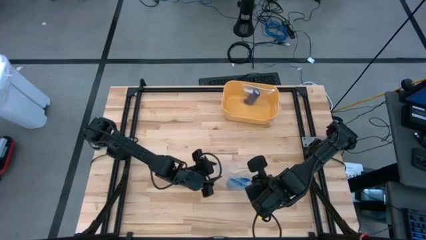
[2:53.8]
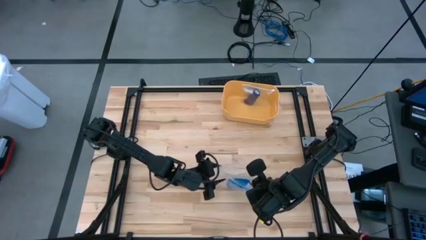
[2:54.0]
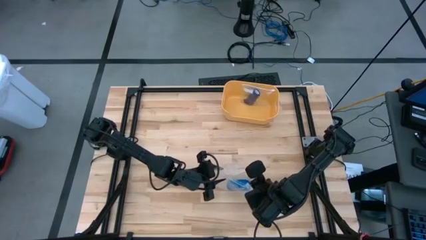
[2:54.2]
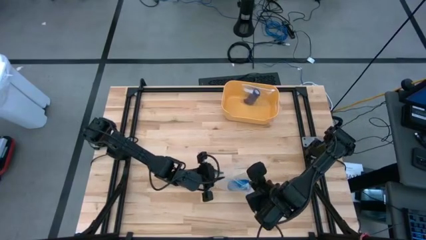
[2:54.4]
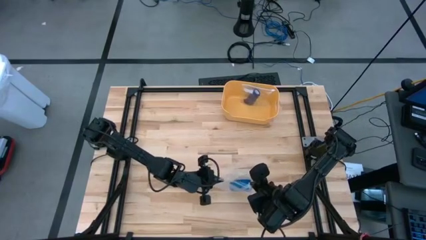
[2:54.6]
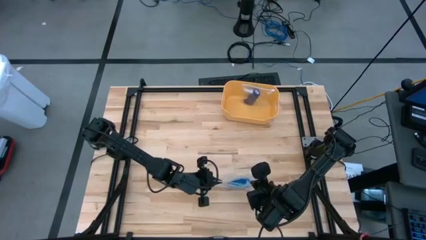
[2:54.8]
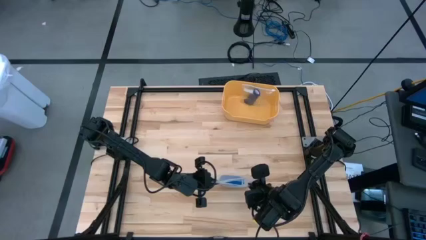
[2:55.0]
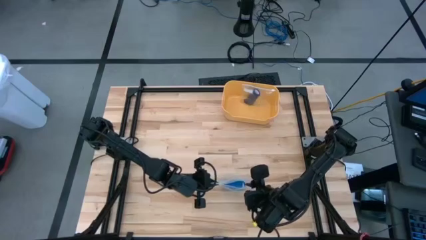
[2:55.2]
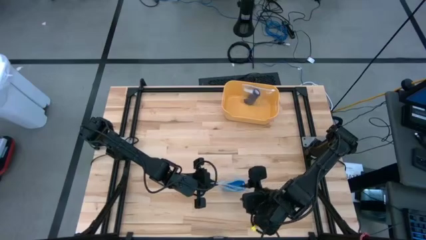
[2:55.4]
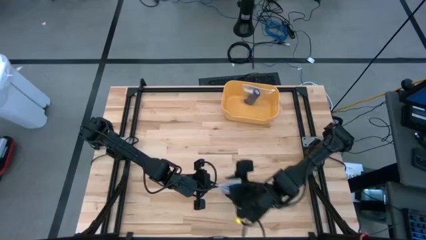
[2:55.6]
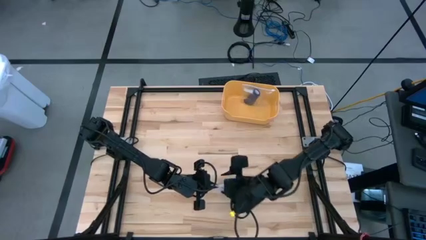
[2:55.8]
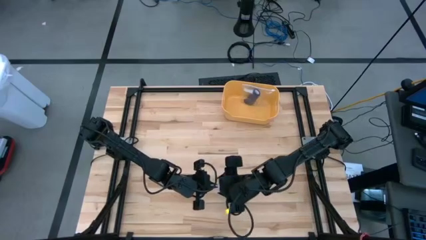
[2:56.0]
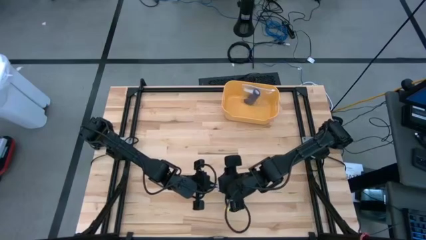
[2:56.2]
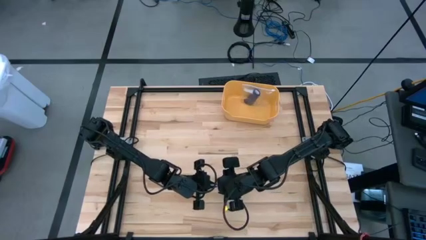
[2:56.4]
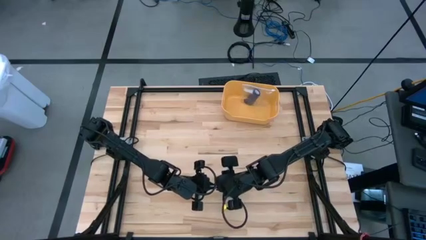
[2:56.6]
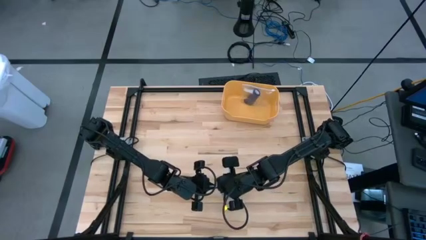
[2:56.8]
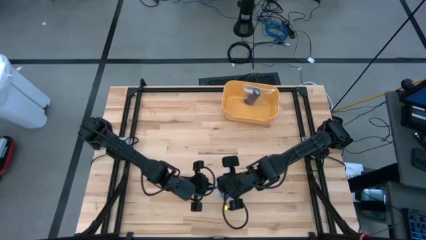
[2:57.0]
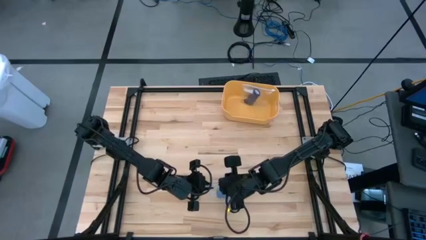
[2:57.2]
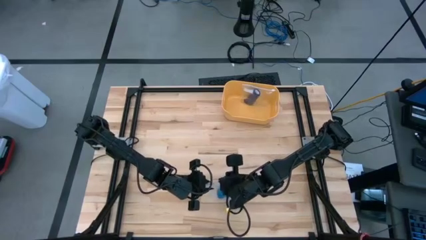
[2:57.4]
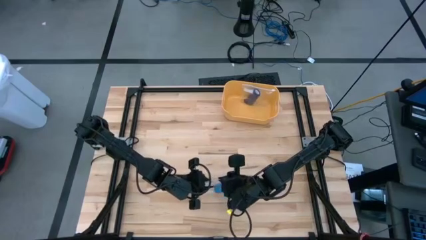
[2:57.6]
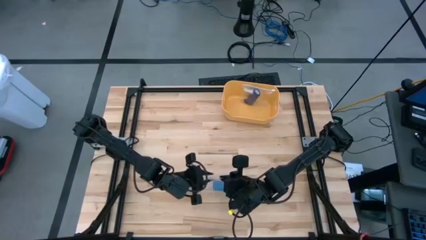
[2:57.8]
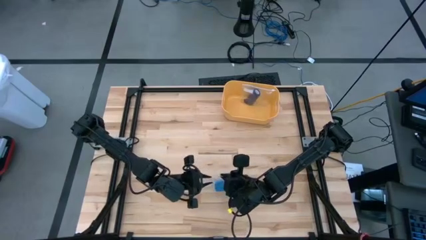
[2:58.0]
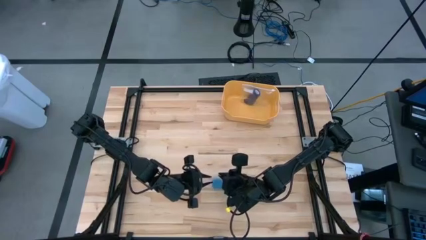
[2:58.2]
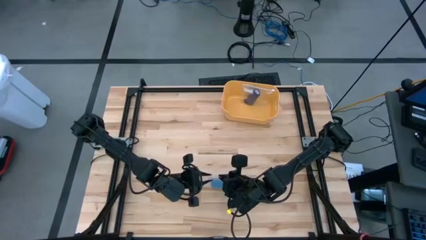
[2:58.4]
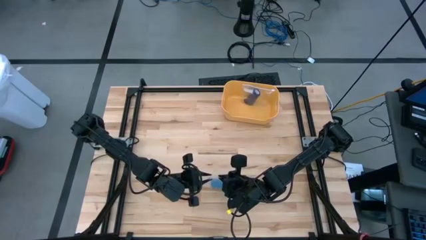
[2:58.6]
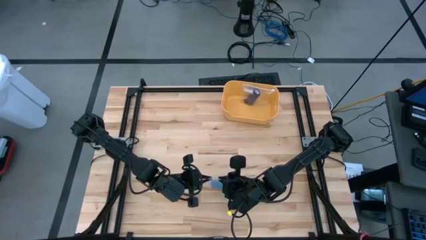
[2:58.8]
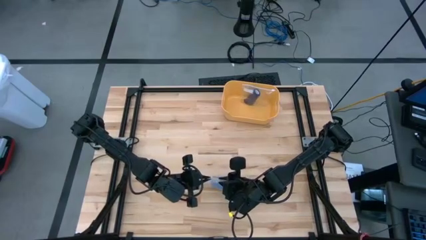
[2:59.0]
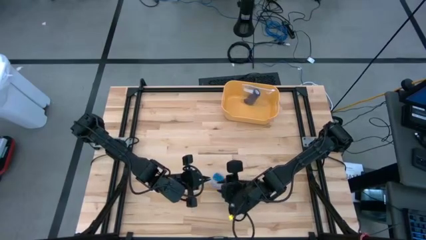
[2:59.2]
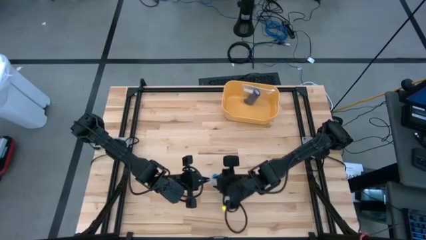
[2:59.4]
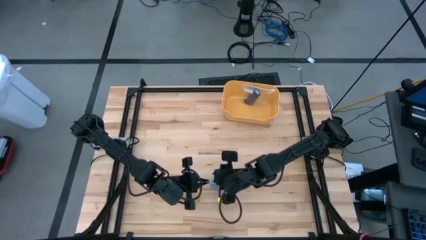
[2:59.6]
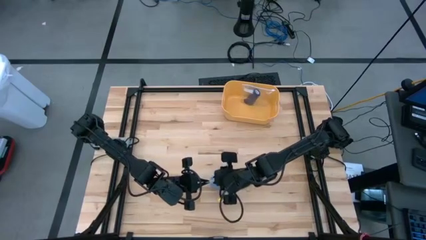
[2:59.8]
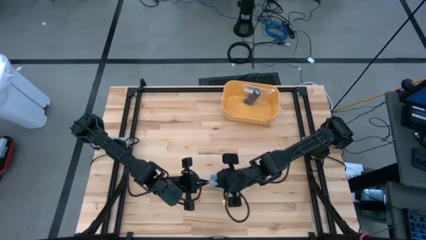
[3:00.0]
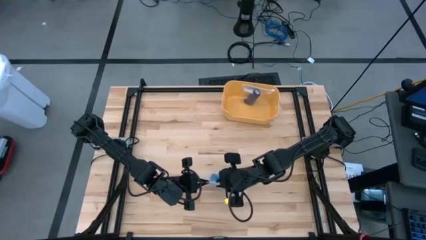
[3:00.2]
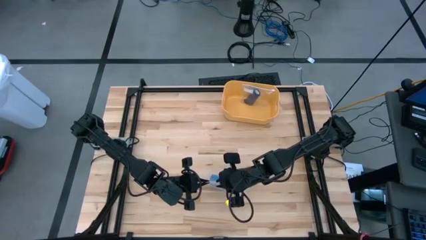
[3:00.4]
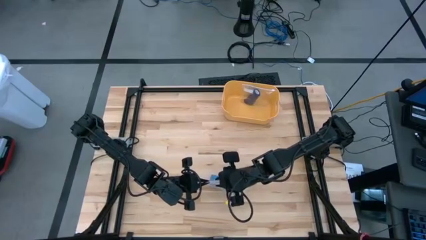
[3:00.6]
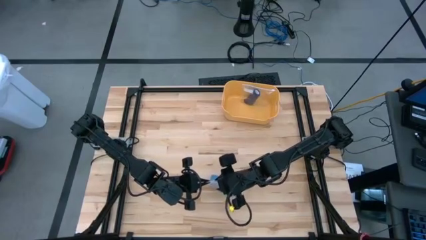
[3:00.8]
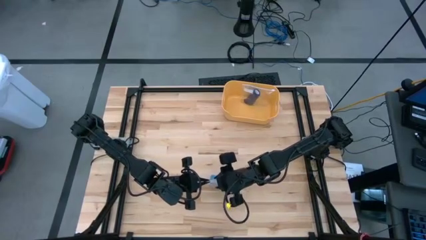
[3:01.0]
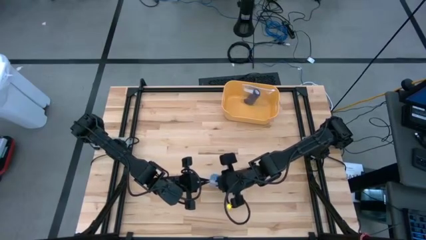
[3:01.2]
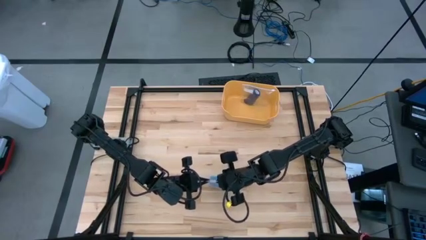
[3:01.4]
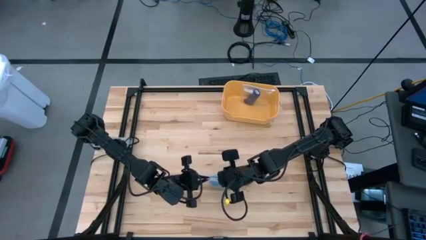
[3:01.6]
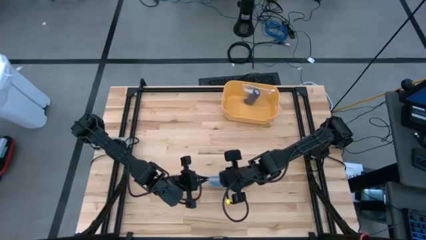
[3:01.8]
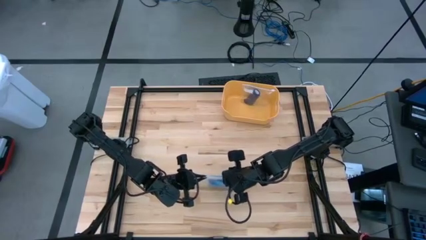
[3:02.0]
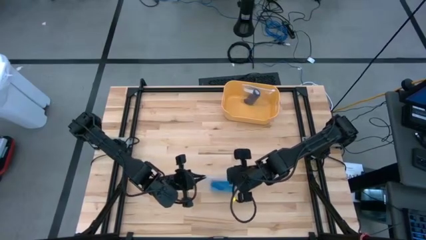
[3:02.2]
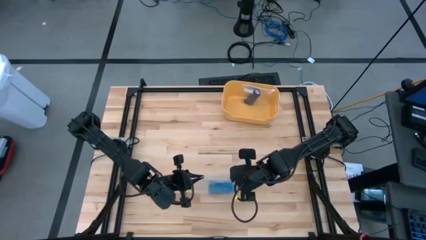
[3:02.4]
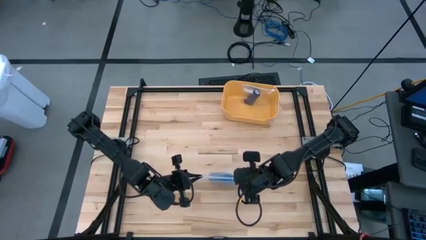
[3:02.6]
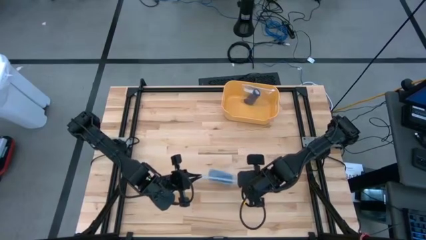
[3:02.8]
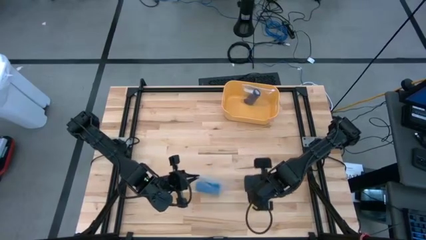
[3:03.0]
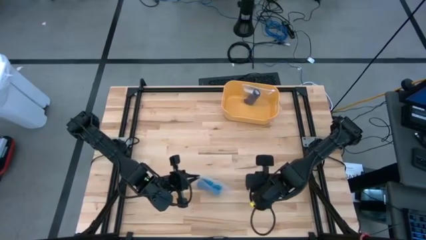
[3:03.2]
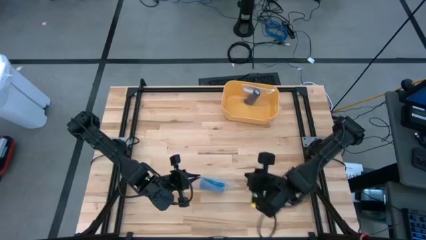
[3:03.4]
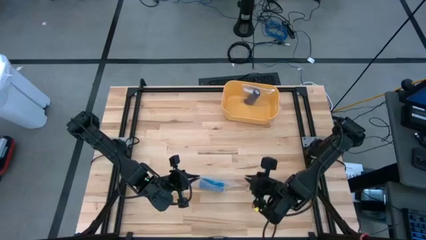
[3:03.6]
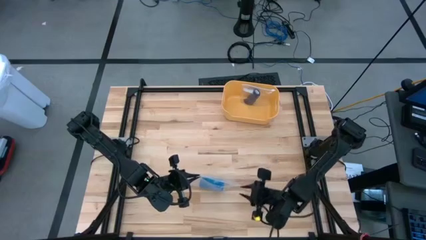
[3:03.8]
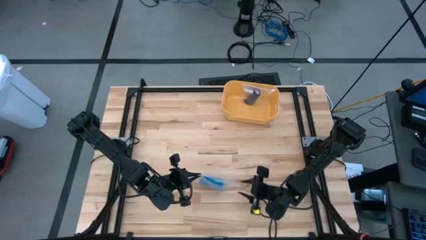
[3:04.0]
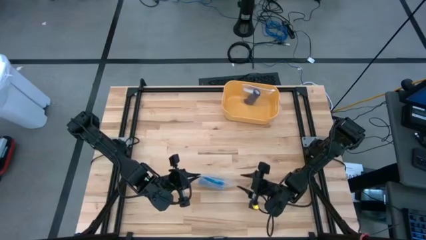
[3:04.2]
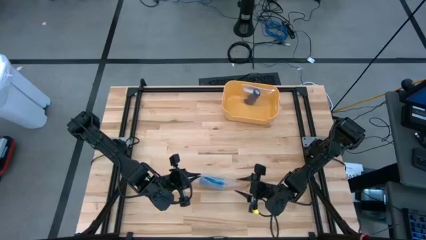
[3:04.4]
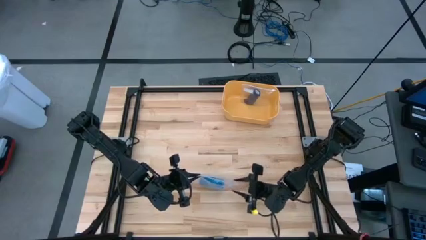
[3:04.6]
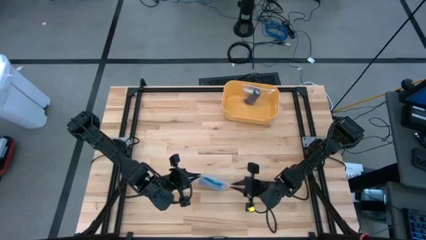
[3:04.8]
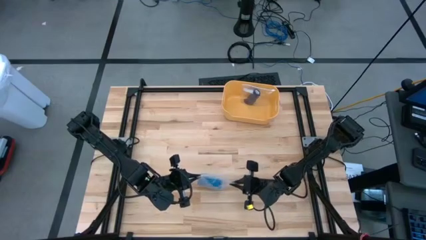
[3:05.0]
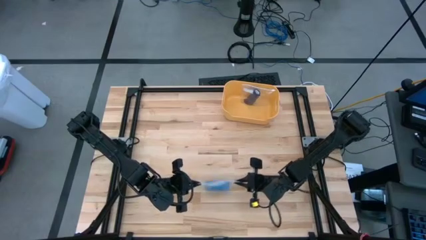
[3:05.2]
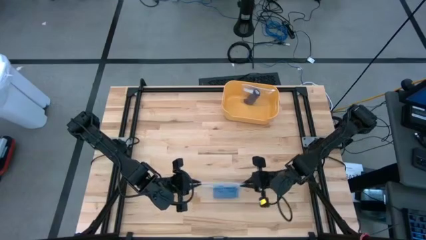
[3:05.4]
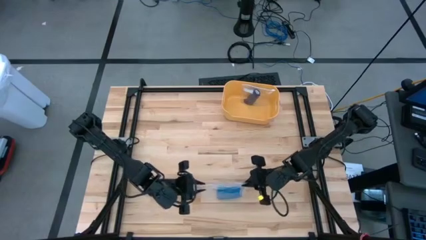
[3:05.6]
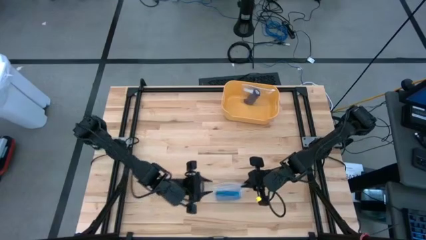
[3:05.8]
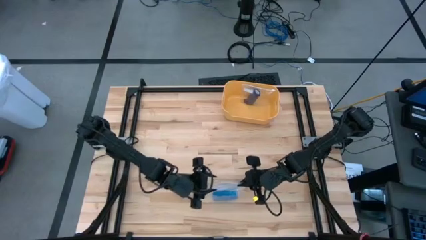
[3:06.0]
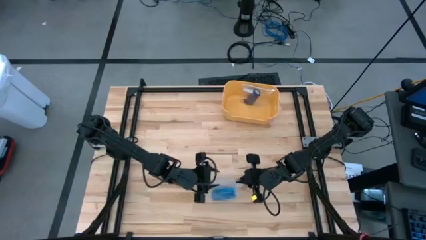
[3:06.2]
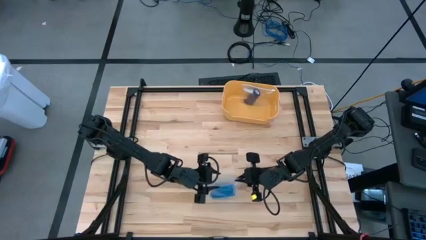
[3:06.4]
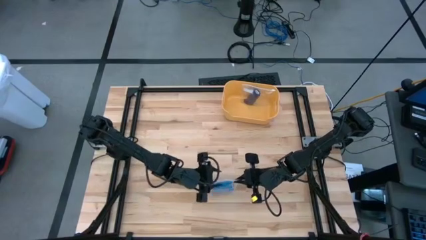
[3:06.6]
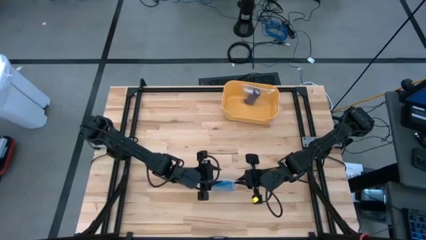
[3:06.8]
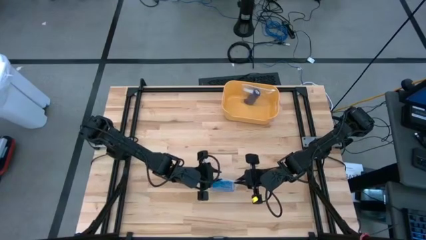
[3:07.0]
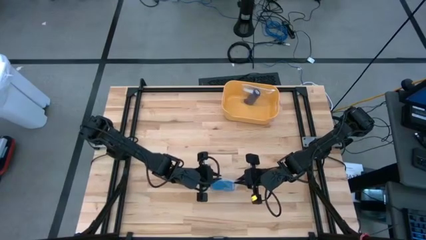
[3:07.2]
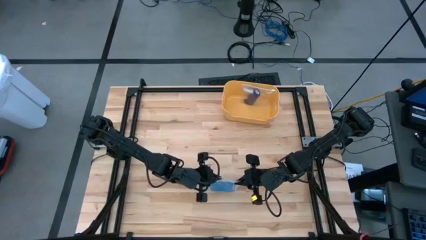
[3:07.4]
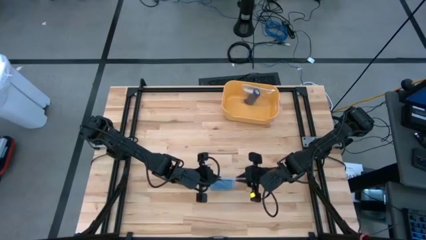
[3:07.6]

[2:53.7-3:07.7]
Task: Roll bandage
Close the transparent zip bag

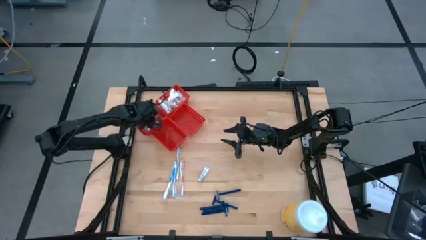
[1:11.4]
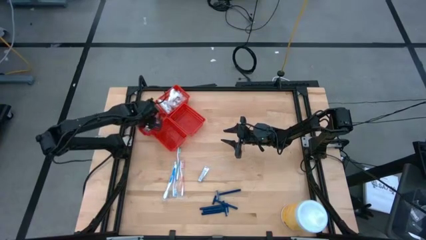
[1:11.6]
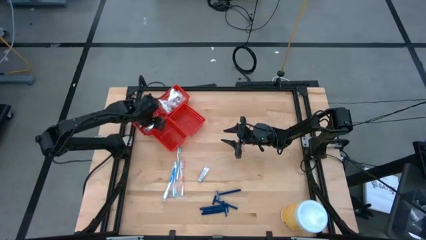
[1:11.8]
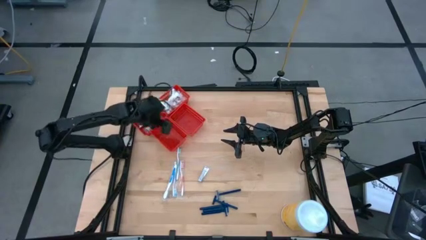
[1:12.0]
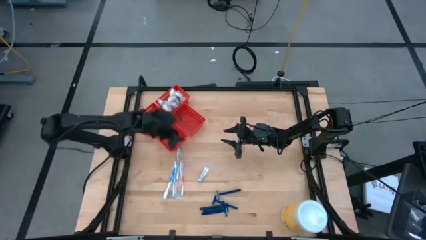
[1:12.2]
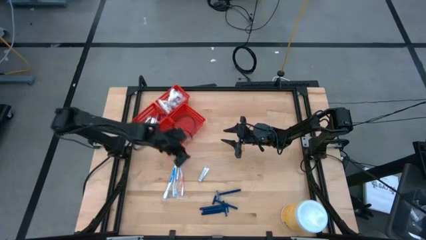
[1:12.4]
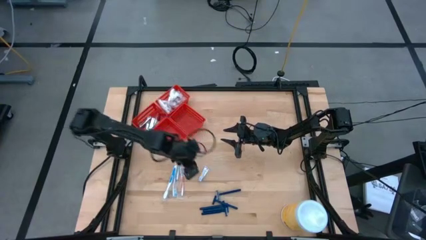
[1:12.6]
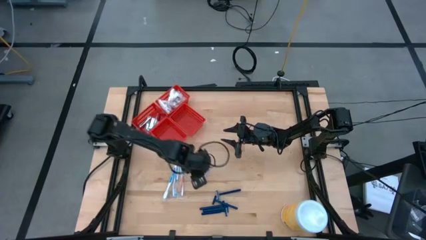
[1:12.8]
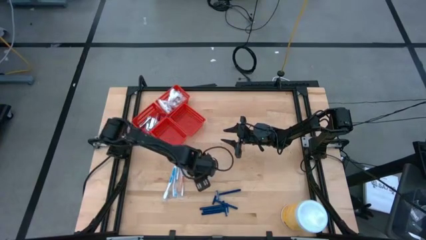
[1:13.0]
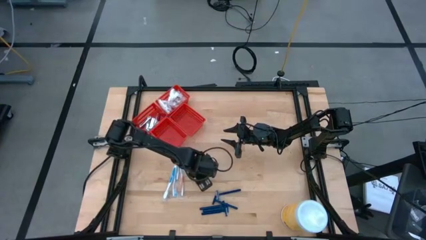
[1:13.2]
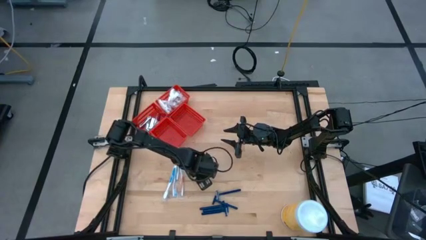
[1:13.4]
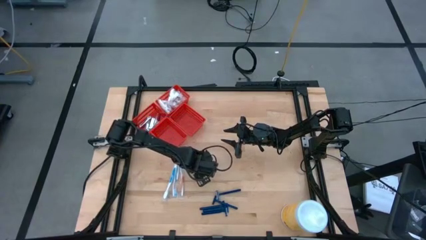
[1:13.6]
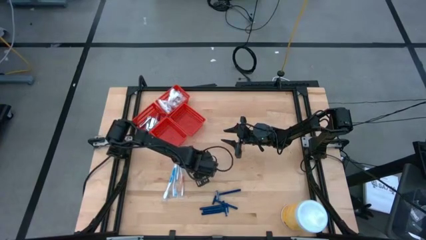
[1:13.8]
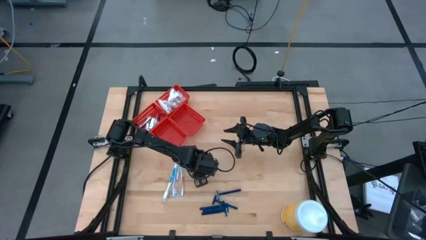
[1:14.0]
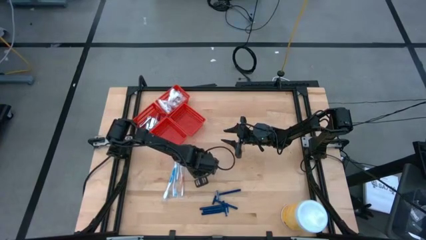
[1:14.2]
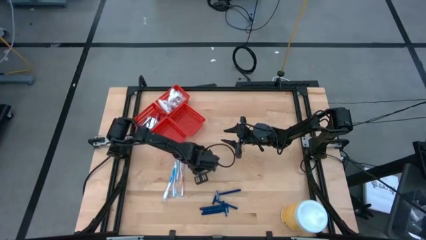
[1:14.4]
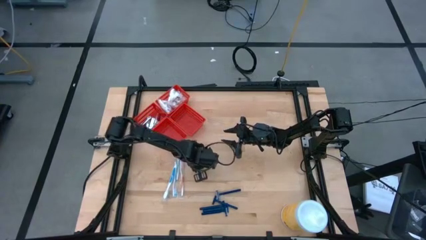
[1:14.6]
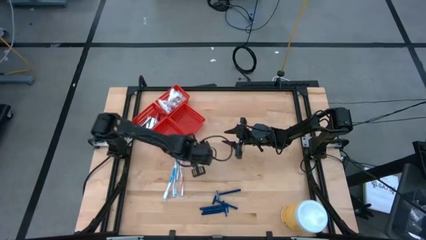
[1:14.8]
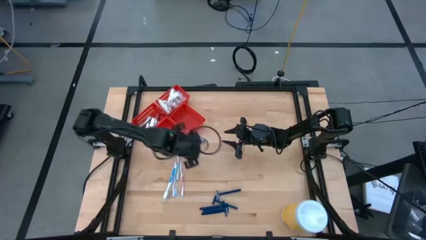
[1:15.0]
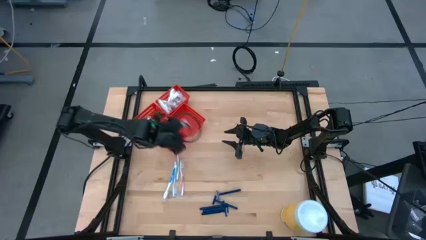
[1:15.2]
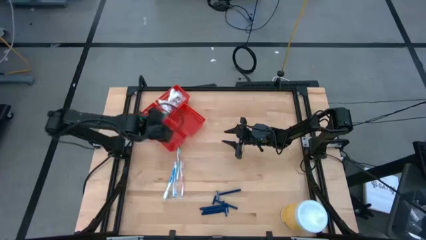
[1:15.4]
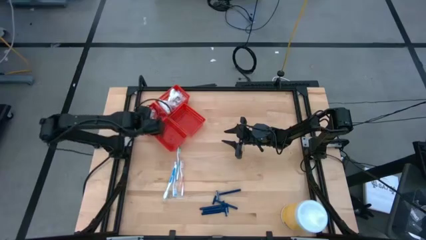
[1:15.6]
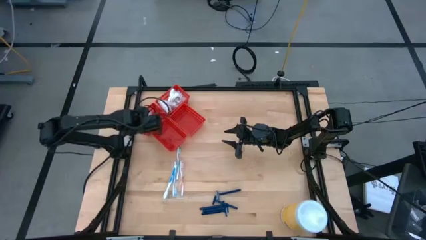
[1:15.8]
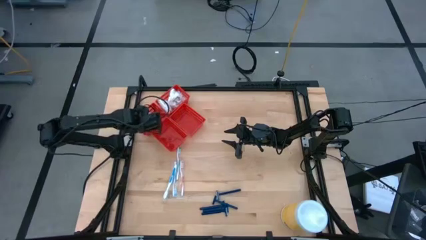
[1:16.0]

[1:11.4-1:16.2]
Task: Pick & Place Travel size toiletries
Put the nail cutter into the horizontal left red bin
